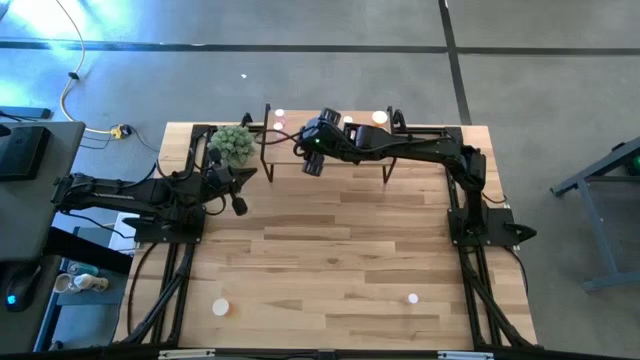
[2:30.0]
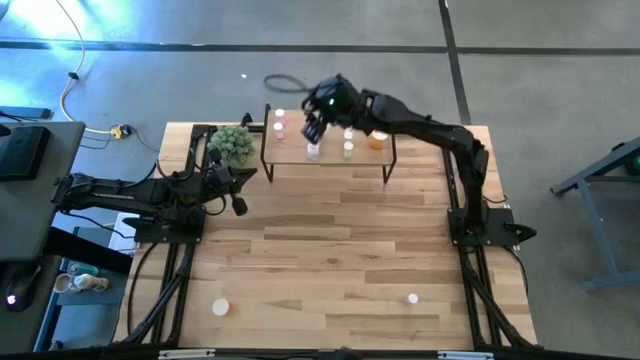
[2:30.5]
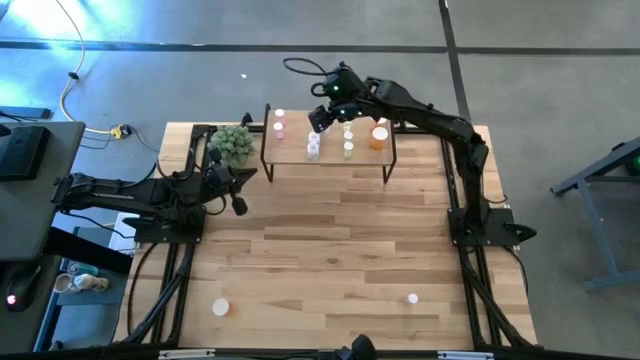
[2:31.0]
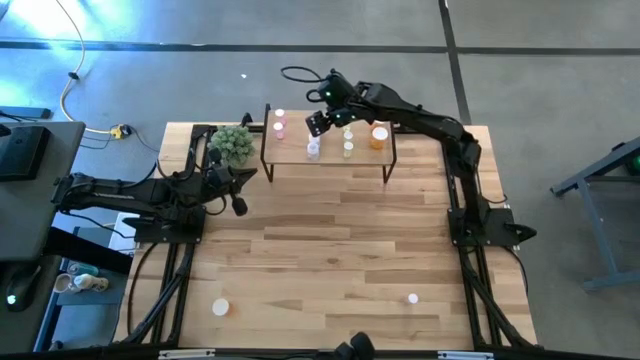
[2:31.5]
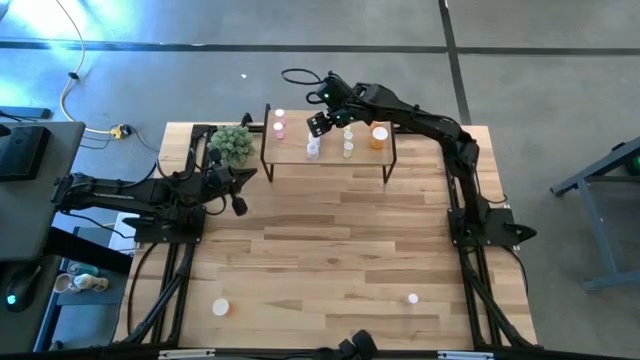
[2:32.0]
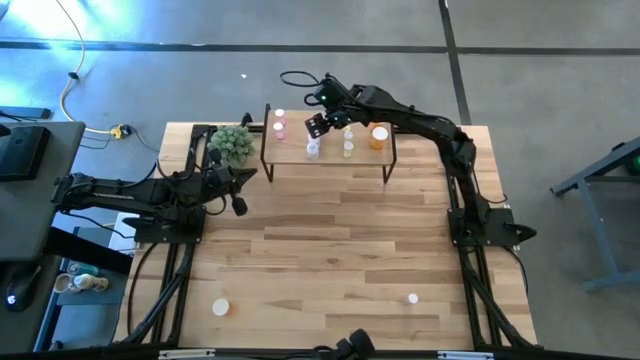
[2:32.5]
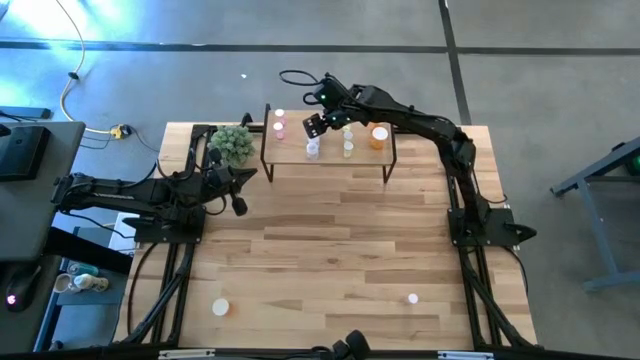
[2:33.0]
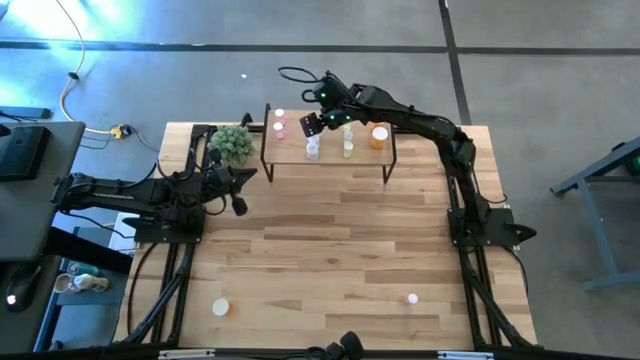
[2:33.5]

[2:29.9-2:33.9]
Task: Pick and place medicine bottles onto shelf by color
Adjust the transparent pill bottles on the shelf

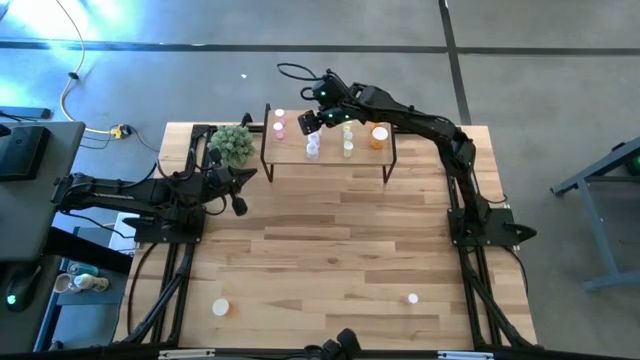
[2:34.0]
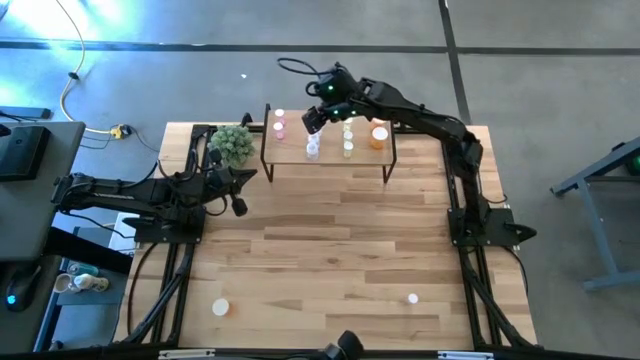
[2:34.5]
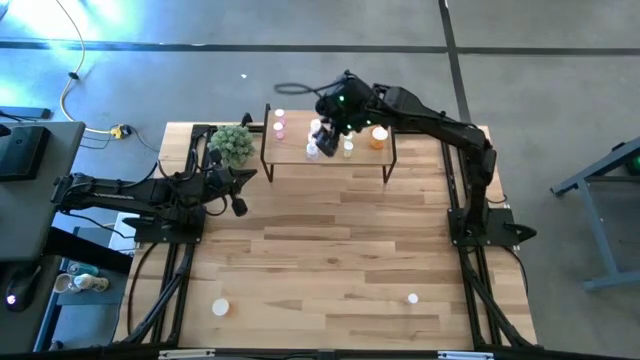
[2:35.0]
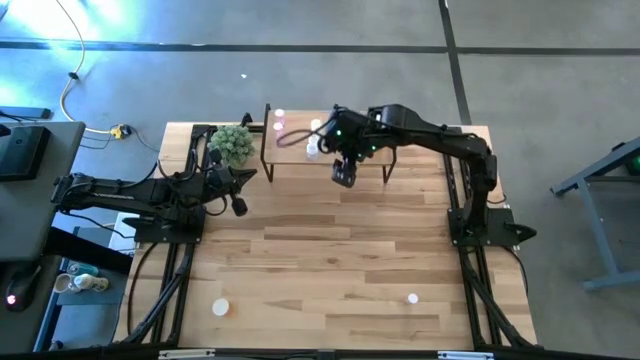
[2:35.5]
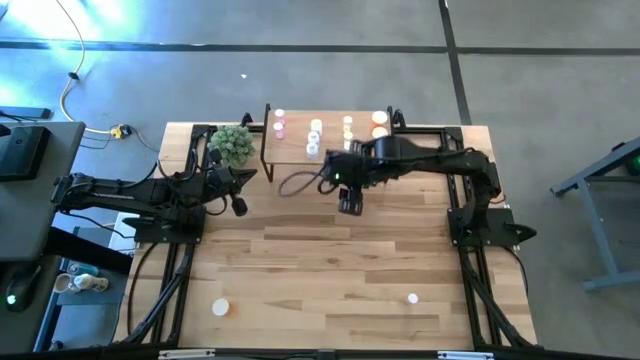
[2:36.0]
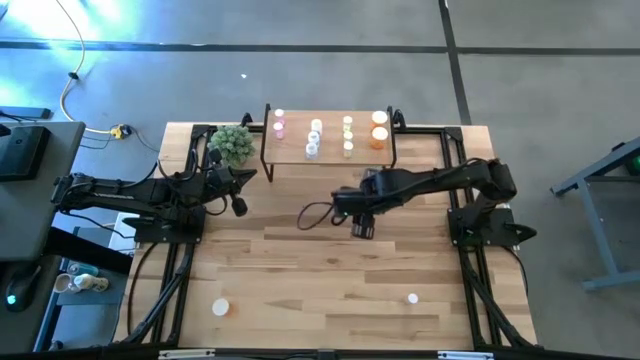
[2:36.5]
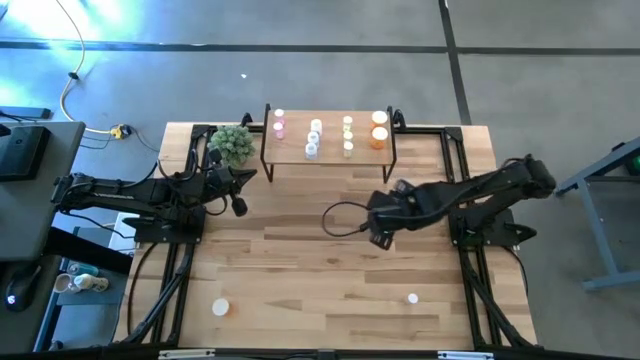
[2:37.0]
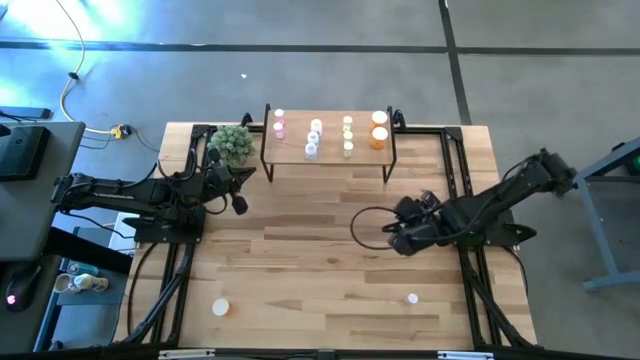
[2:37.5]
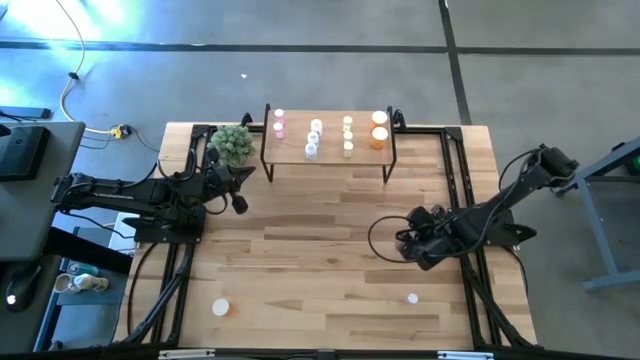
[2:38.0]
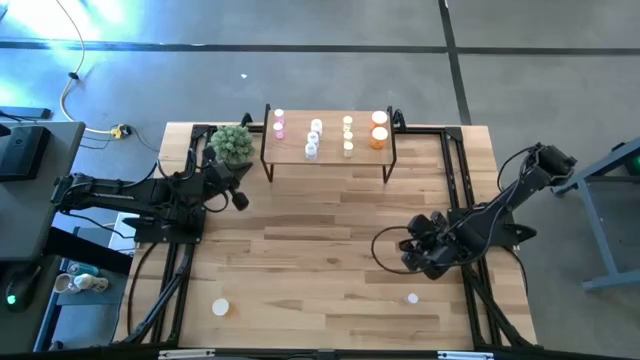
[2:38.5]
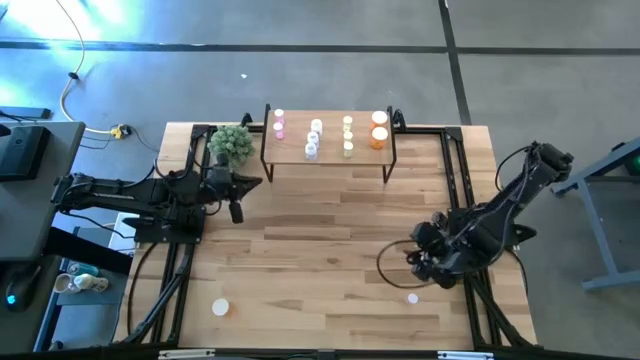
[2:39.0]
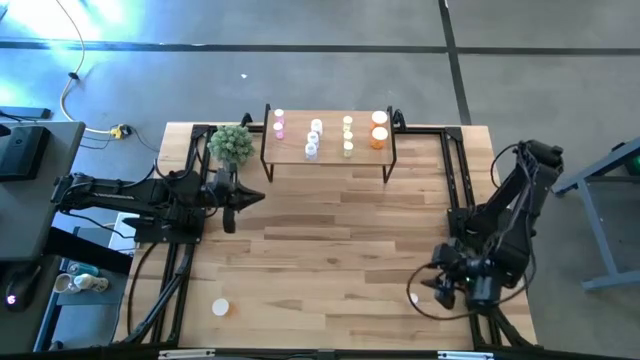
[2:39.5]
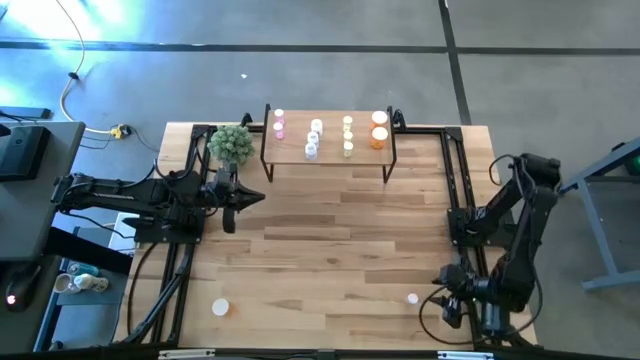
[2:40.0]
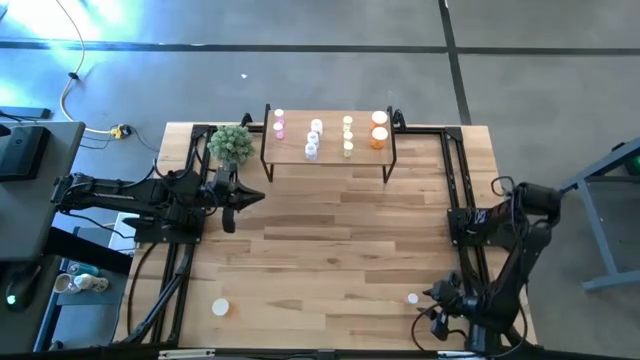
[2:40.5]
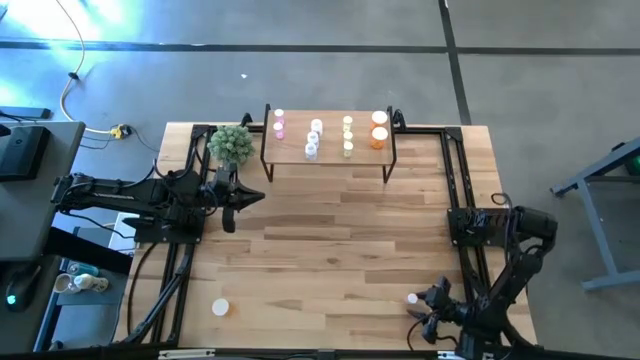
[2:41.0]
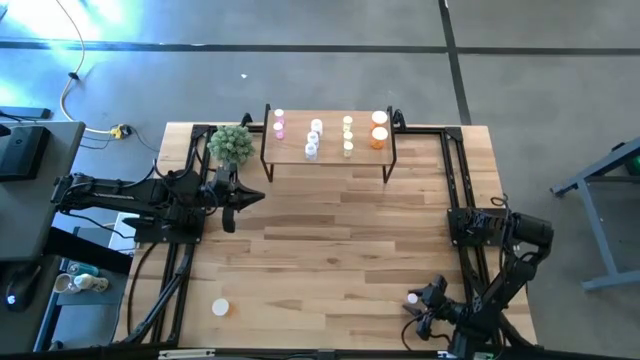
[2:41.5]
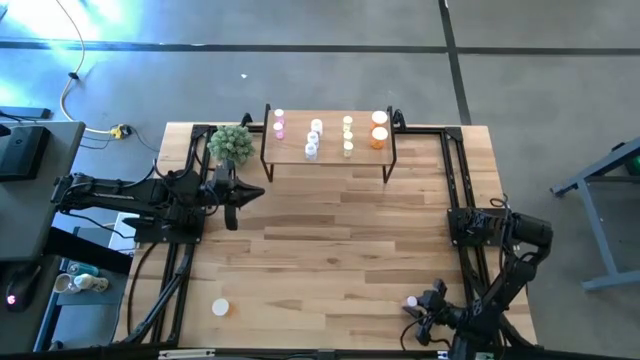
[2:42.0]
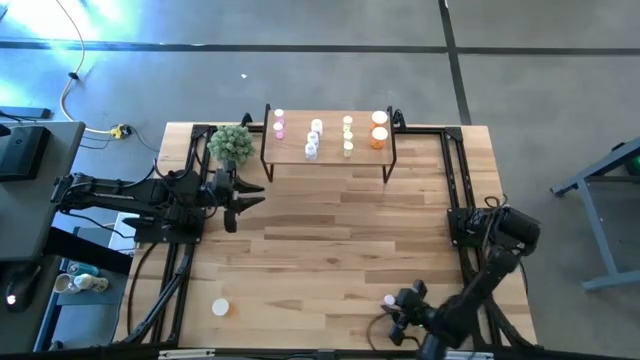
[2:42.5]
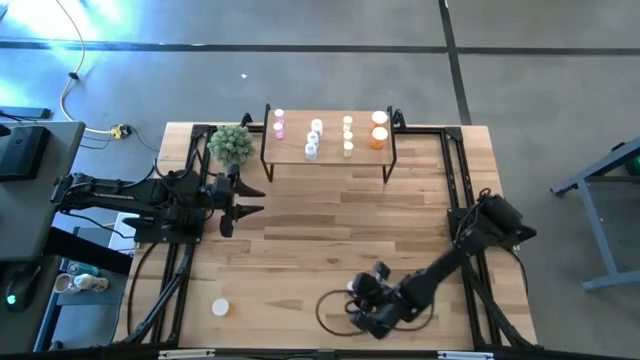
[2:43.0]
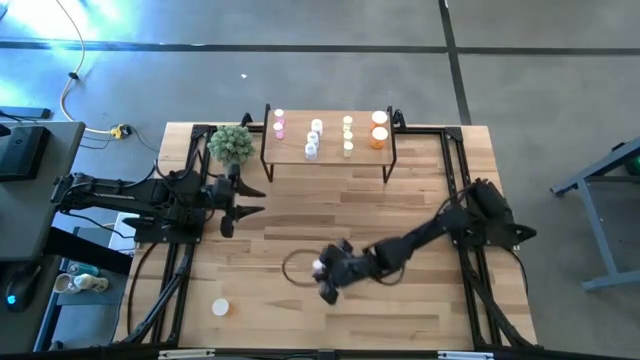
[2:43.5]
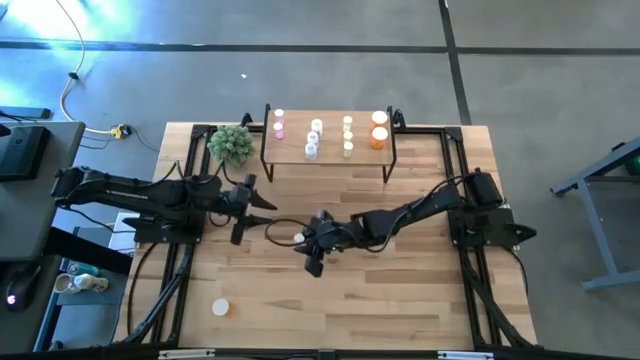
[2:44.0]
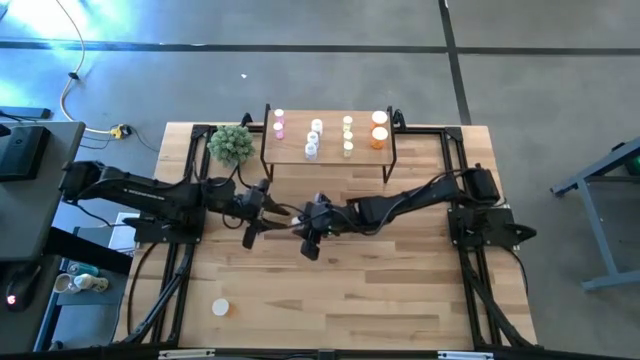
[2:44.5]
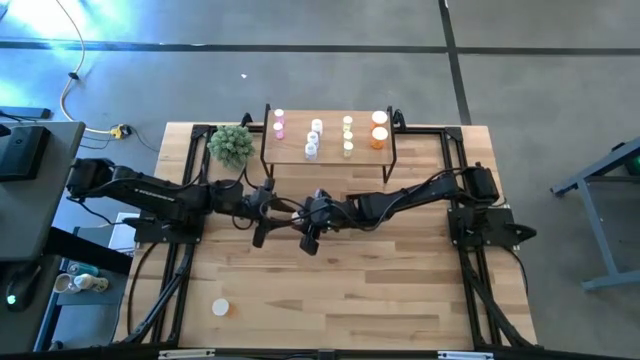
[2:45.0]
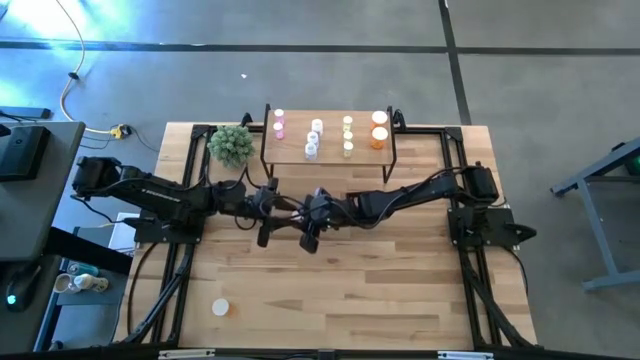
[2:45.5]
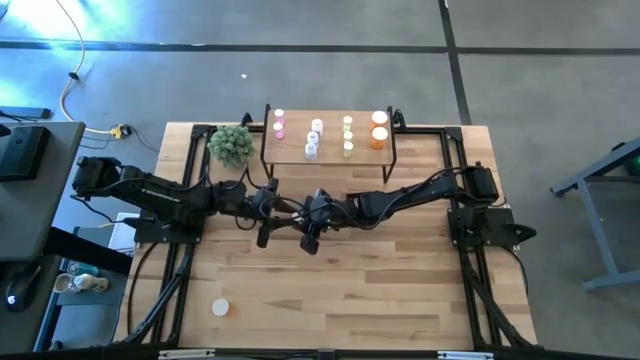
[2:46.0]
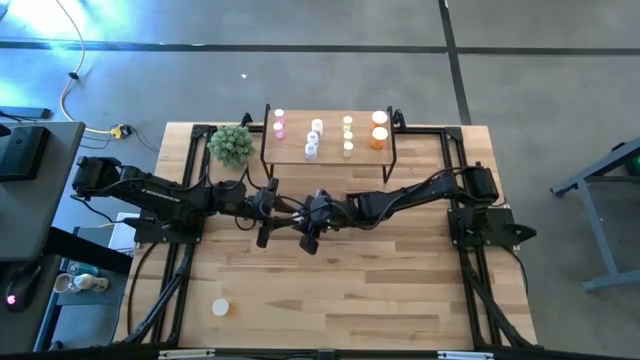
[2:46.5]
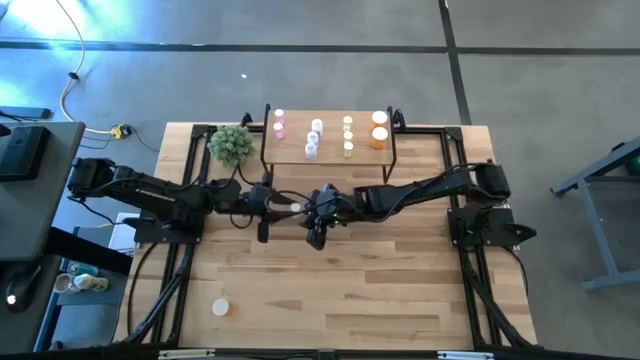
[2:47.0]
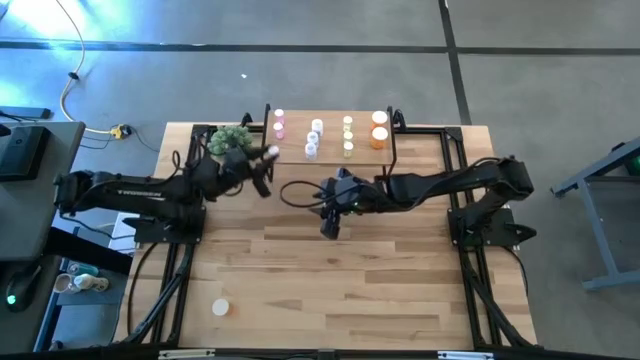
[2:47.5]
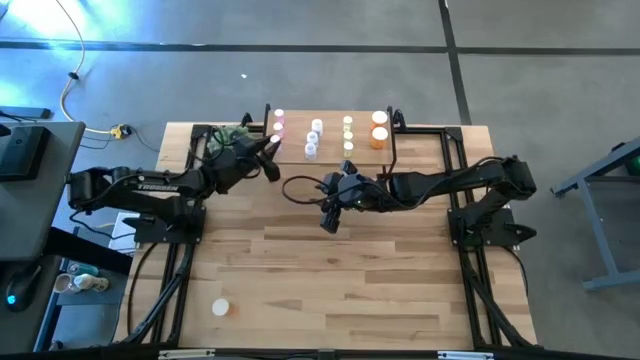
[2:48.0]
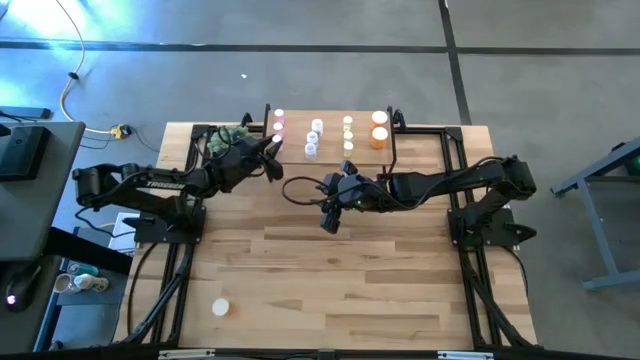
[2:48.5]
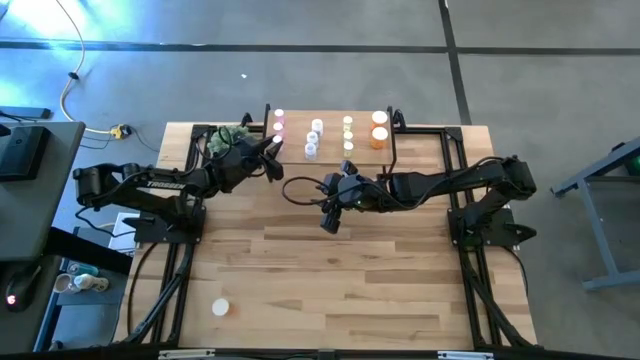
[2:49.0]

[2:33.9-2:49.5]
Put the pink pill bottle on the shelf aligned with the other pink pill bottles

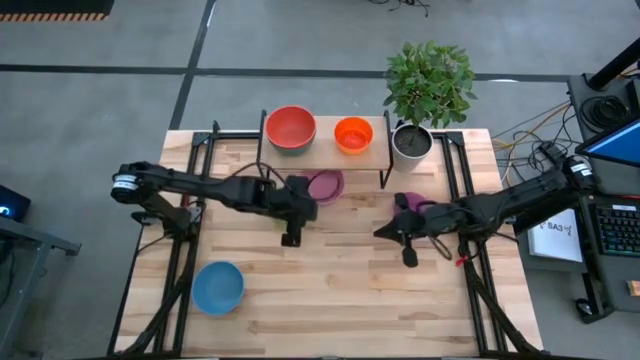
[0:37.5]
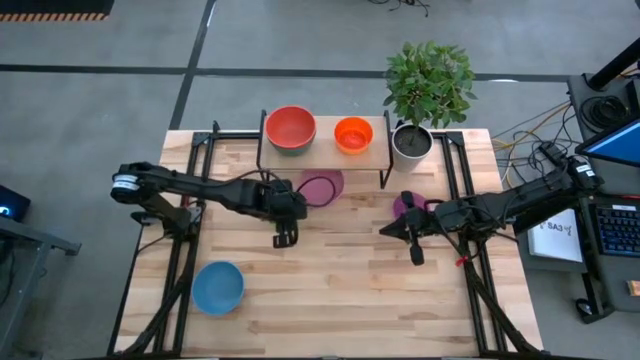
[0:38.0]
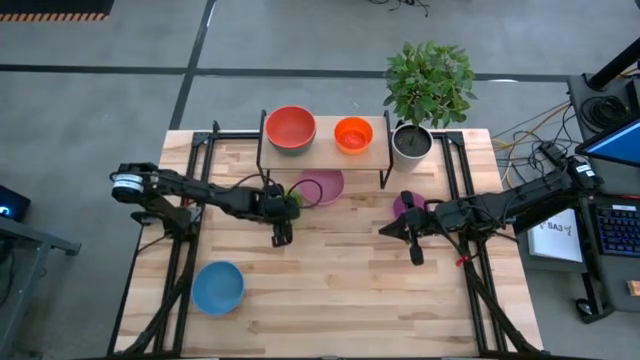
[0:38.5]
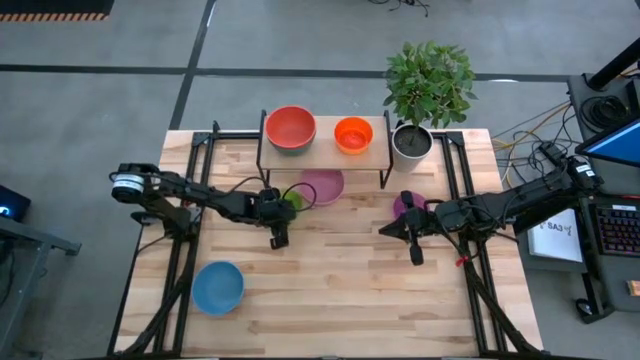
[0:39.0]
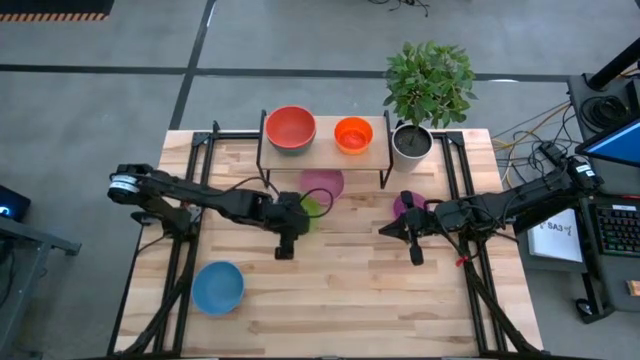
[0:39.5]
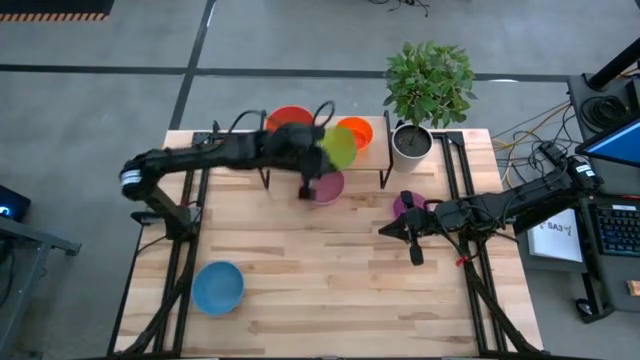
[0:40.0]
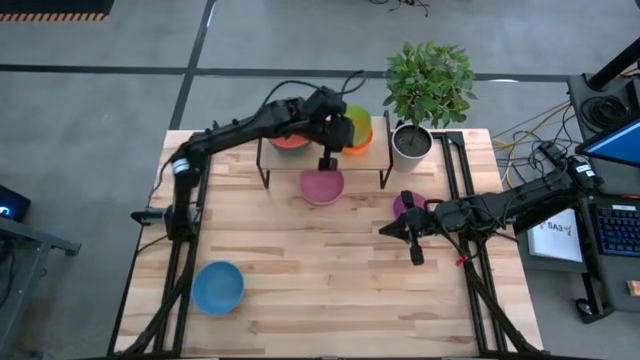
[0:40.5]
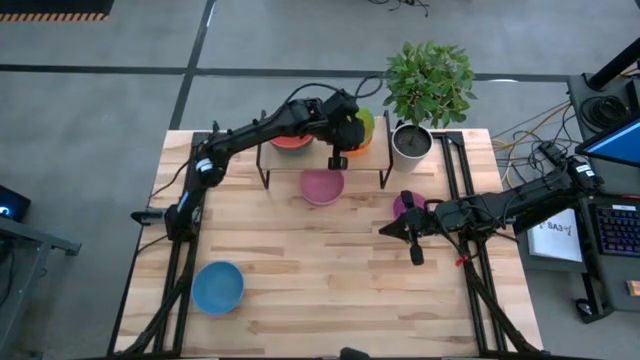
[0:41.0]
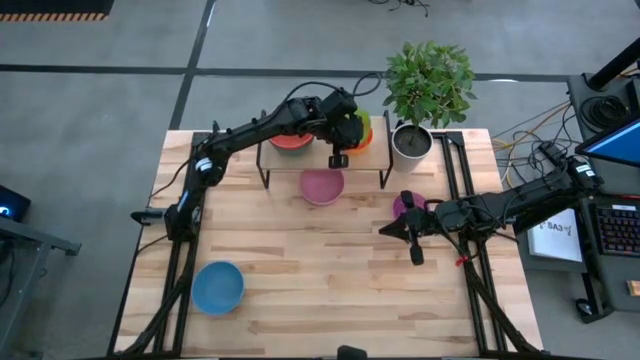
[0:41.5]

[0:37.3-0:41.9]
Task: Place and stack bowls onto a shelf
Stack the green bowl on the orange bowl on the shelf
